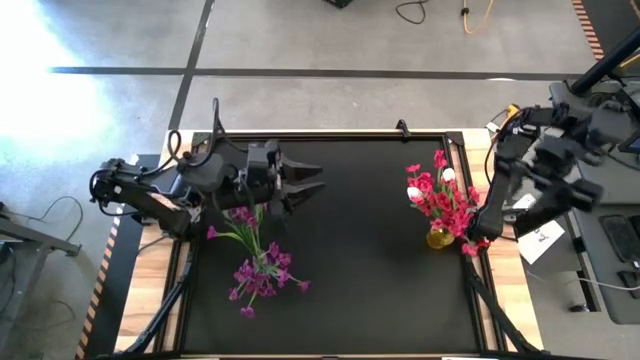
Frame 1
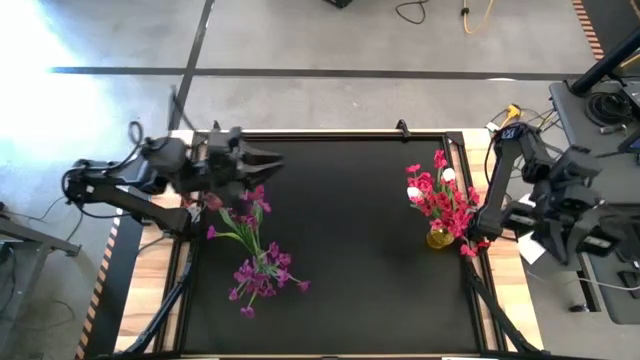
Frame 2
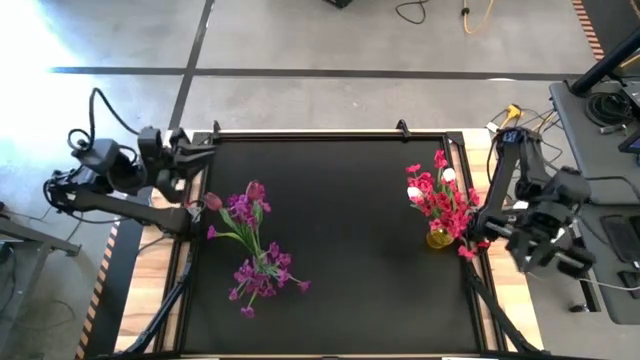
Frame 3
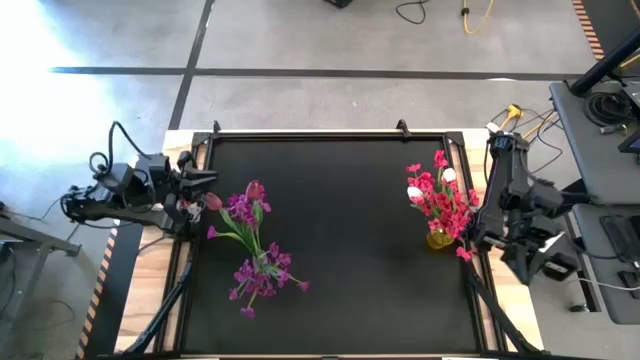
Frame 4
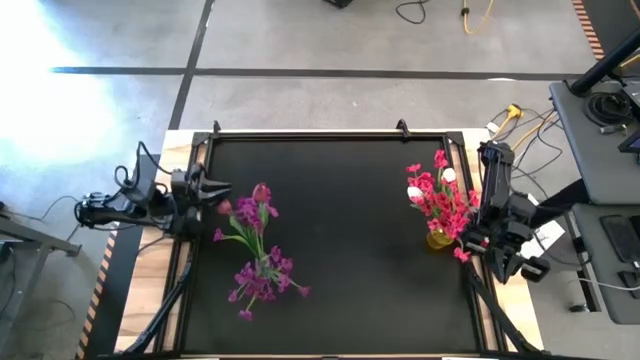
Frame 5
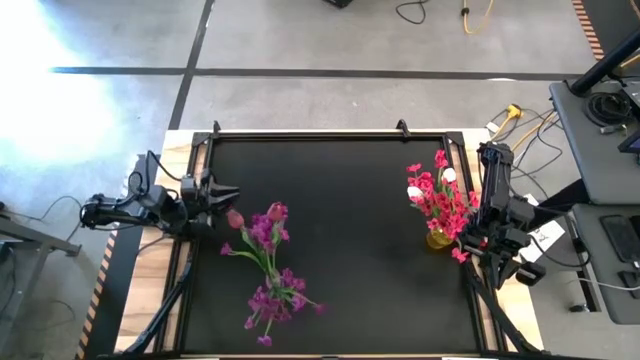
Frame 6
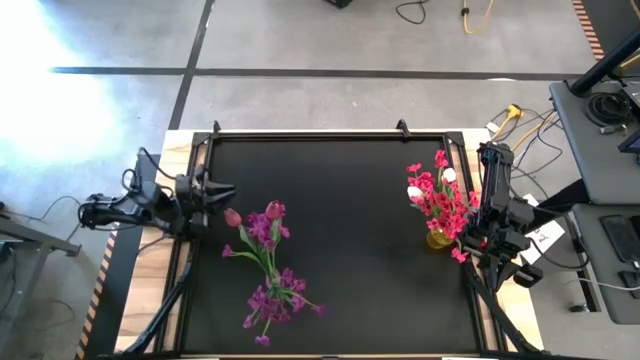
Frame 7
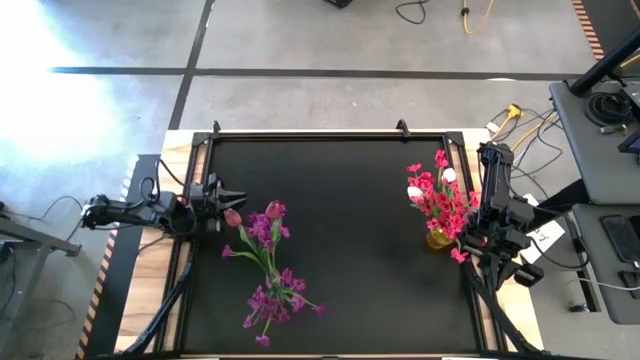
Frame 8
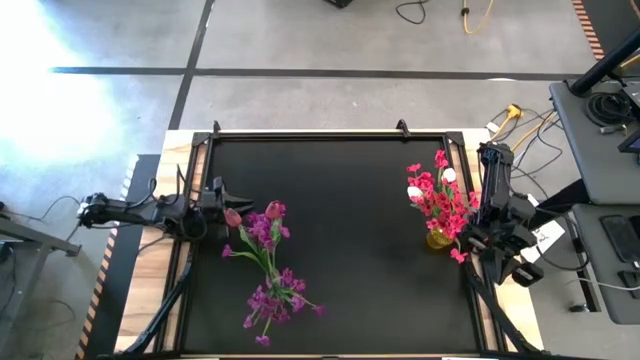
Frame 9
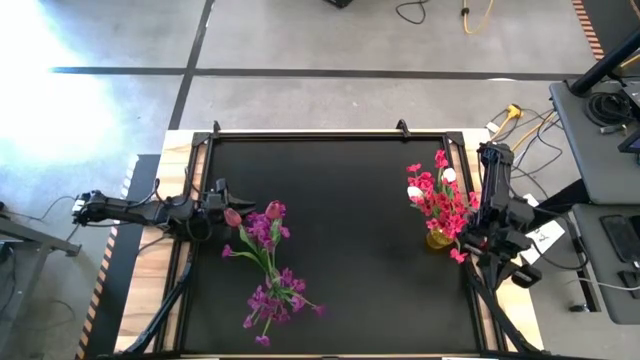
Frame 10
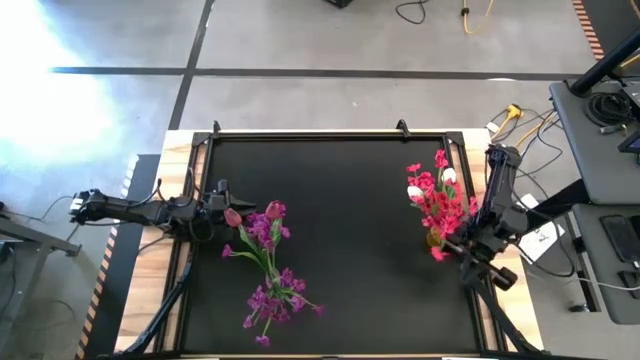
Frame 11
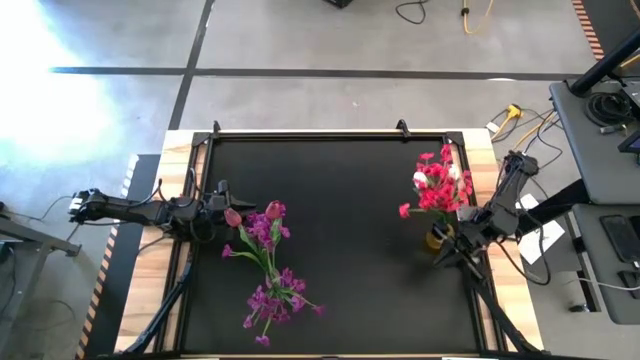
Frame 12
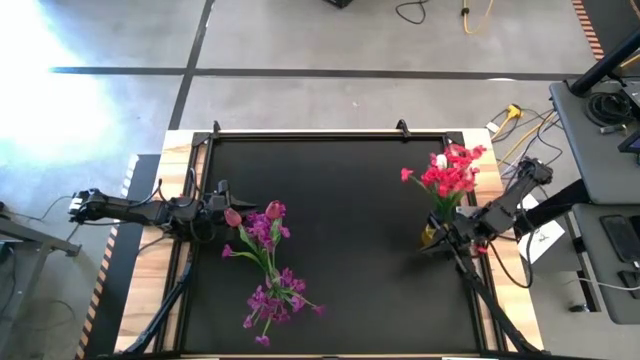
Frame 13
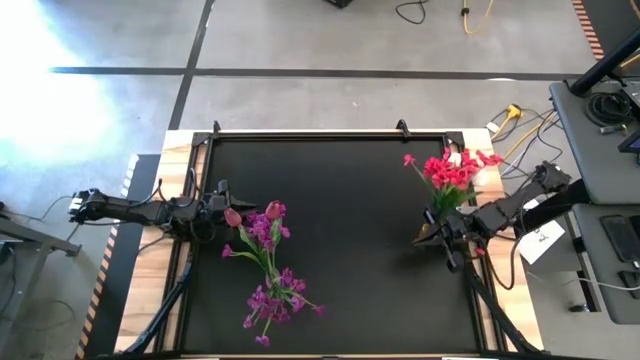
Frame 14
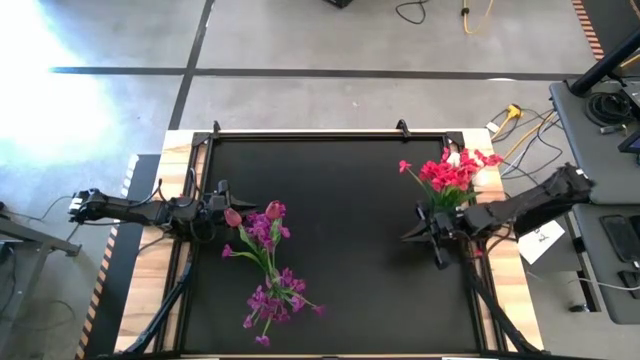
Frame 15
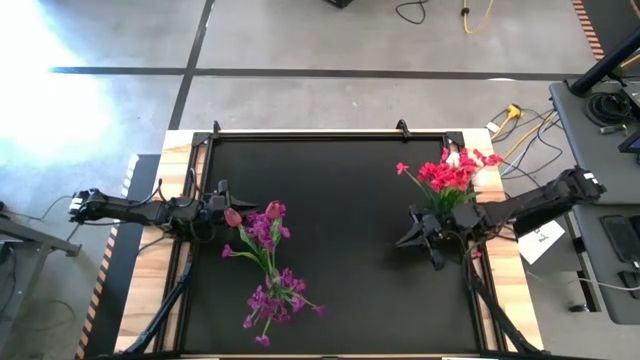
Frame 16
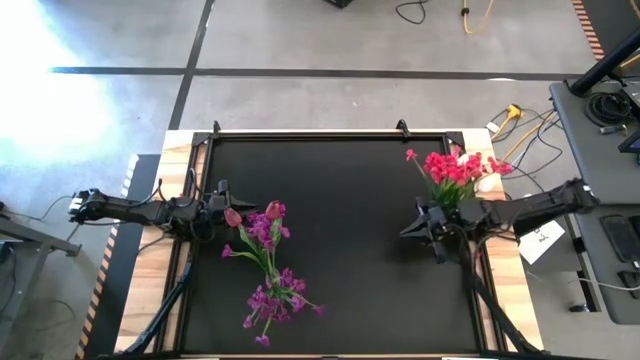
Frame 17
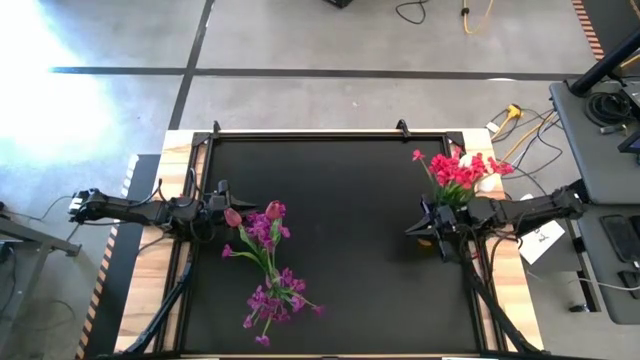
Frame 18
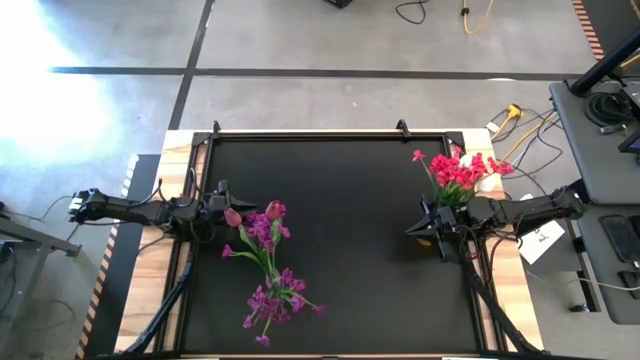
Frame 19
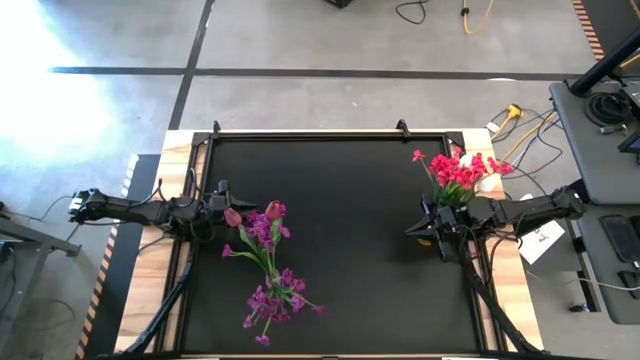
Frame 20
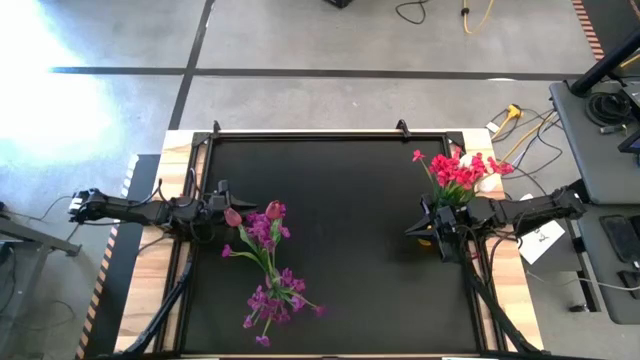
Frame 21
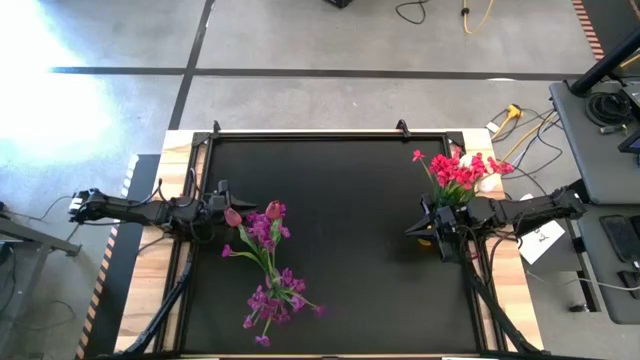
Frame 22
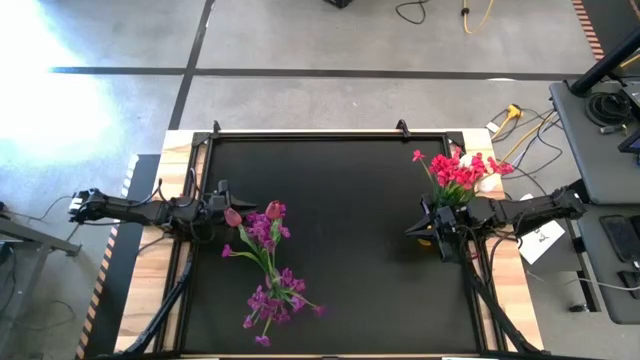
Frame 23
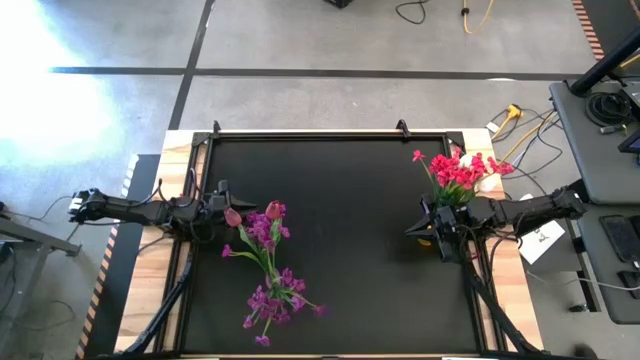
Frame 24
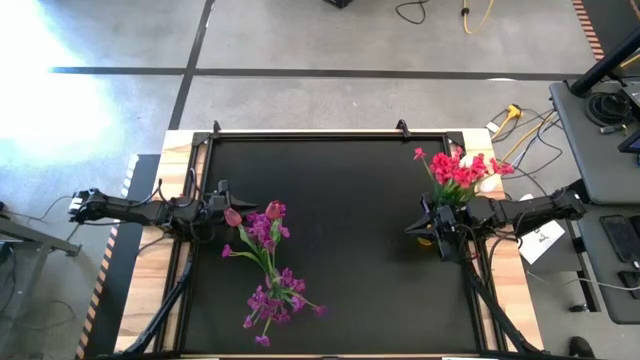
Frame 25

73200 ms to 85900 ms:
Task: Sort flowers into vase by color
Return to Home Position

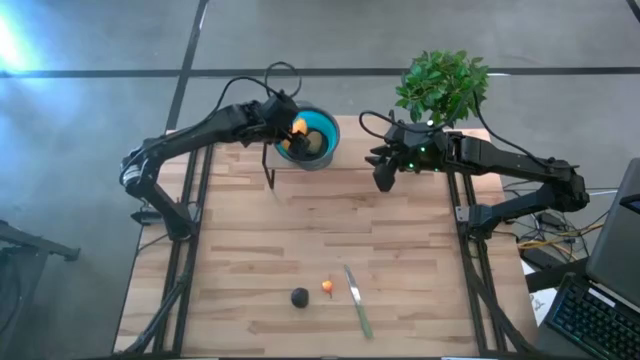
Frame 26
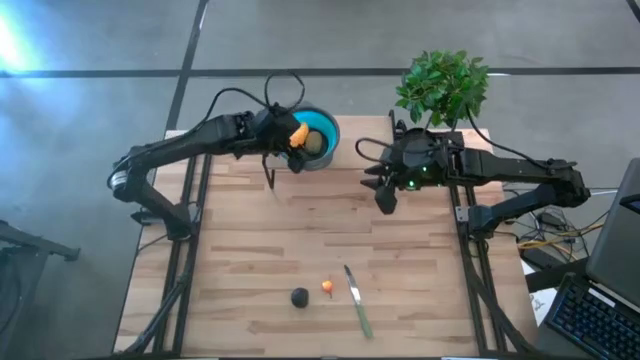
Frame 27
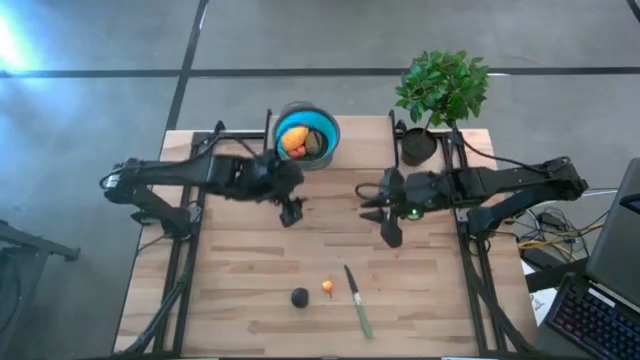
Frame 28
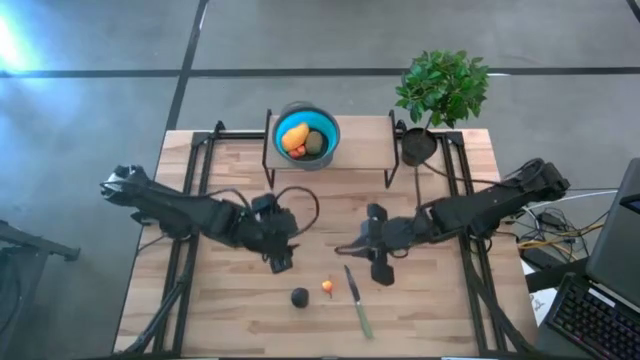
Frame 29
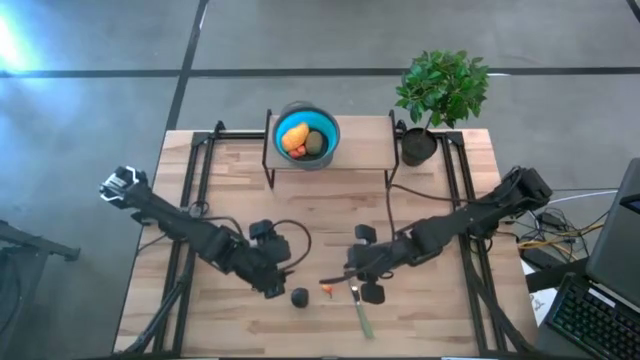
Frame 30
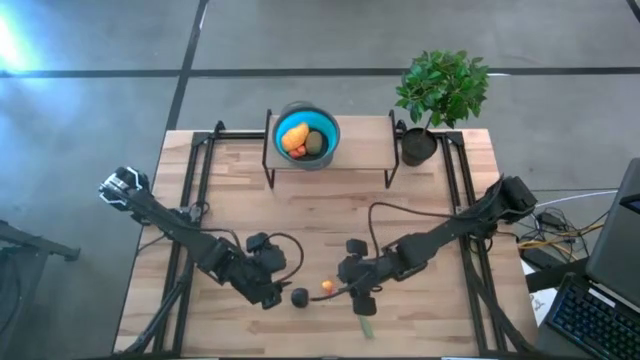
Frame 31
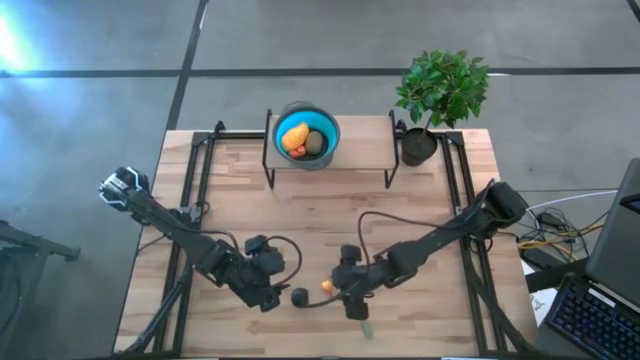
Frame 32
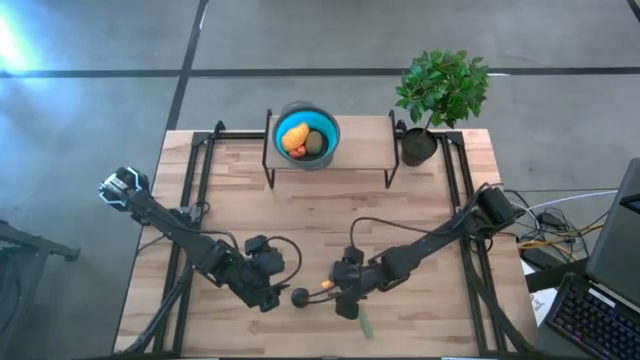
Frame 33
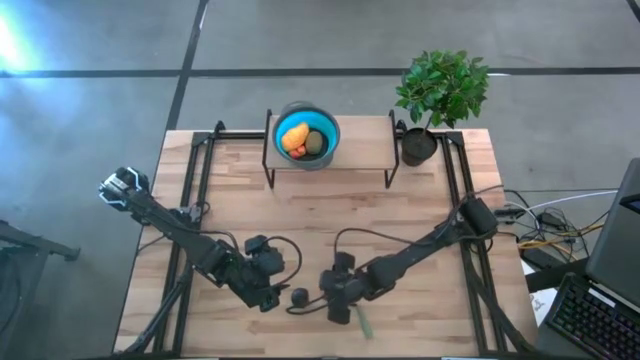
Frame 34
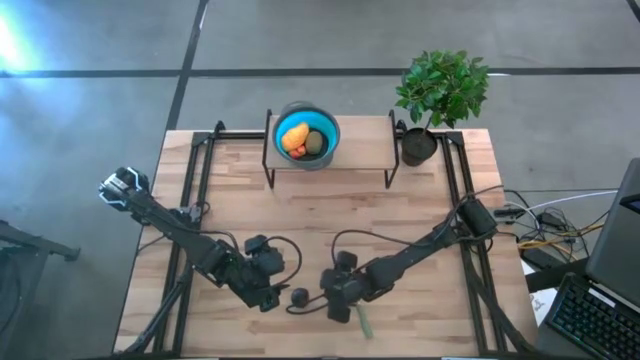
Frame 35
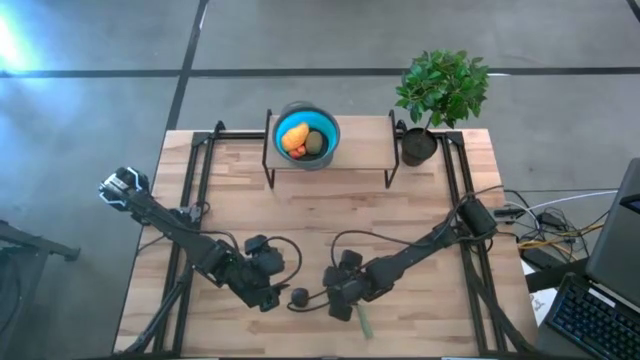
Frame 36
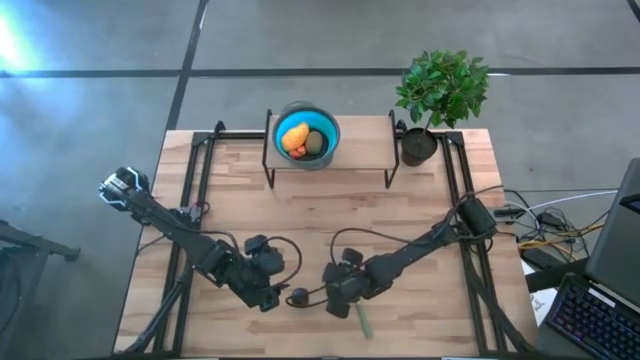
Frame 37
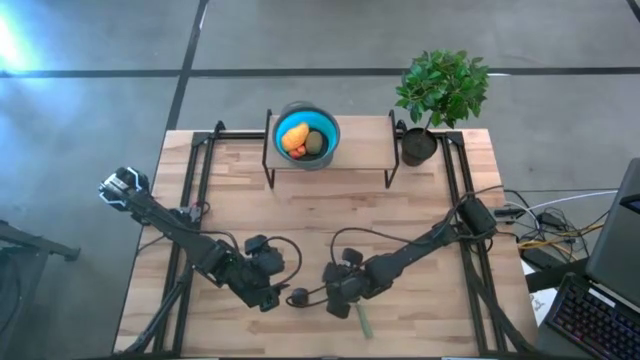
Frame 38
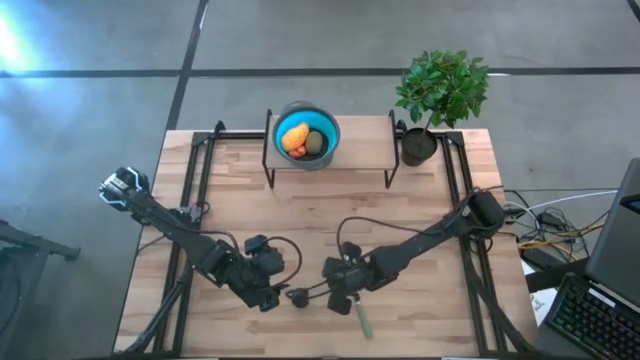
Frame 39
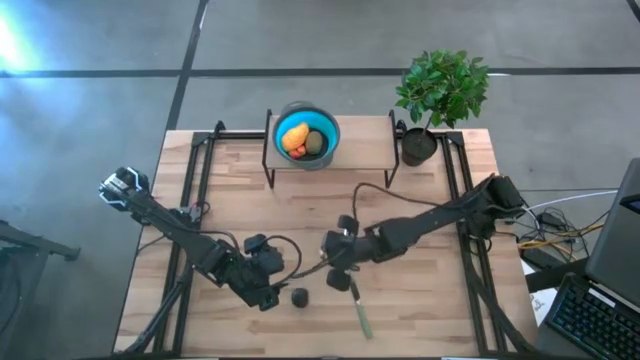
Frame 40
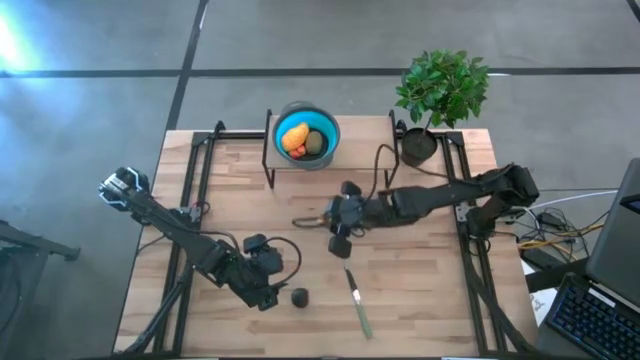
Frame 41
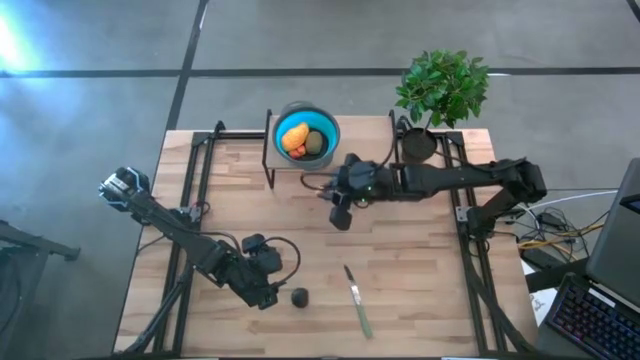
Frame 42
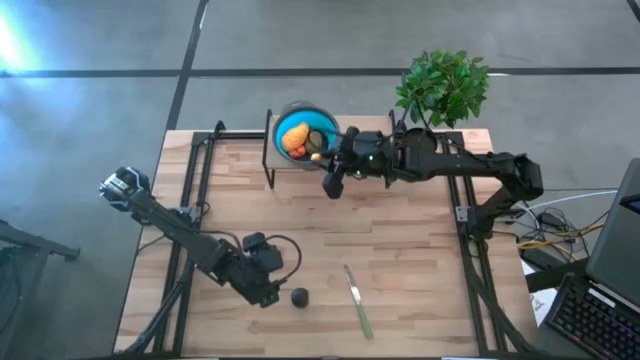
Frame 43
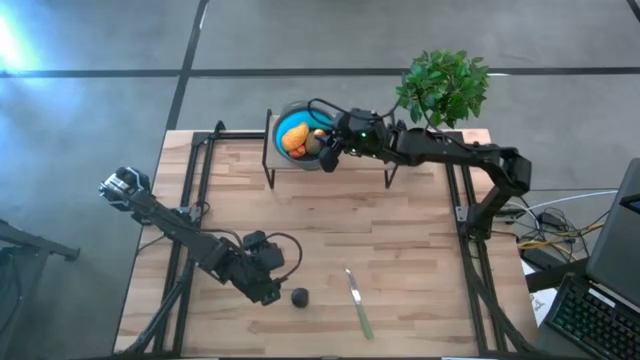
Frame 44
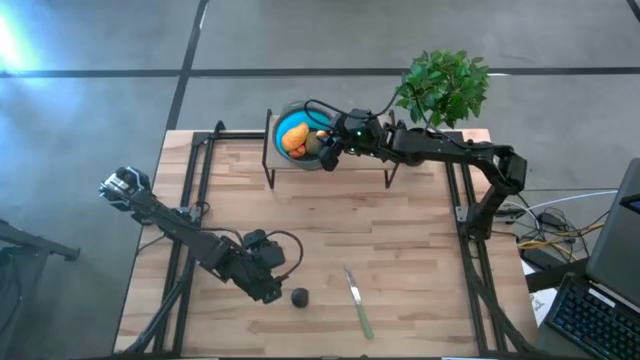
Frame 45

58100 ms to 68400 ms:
Task: Pick & Place Fruit
Put the orange pear into the blue strainer bowl
